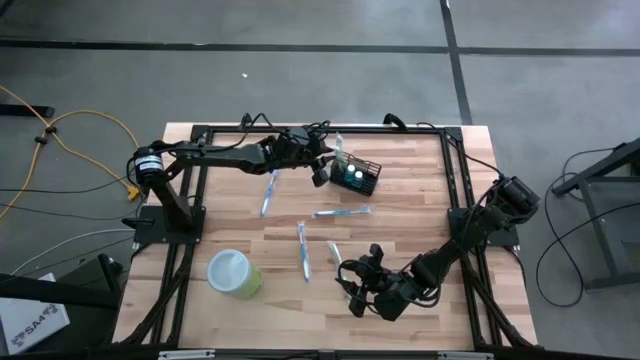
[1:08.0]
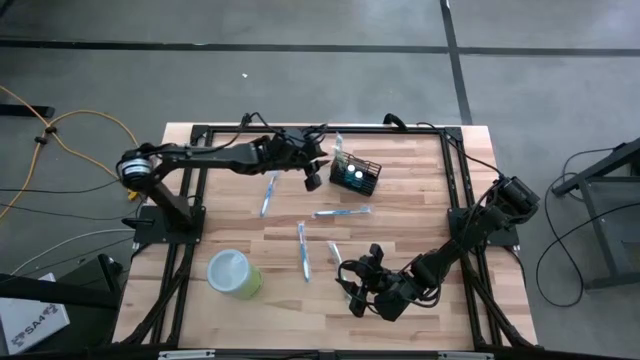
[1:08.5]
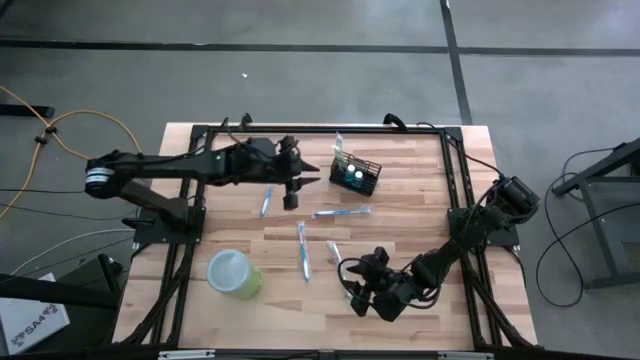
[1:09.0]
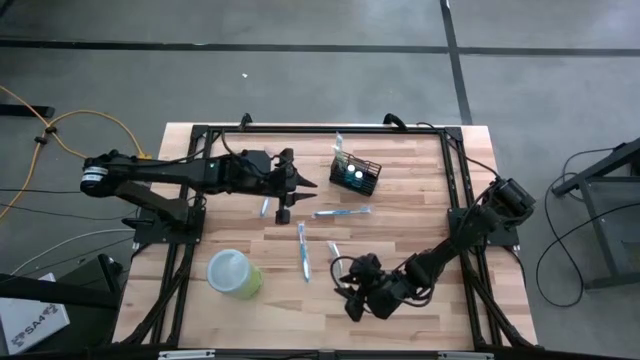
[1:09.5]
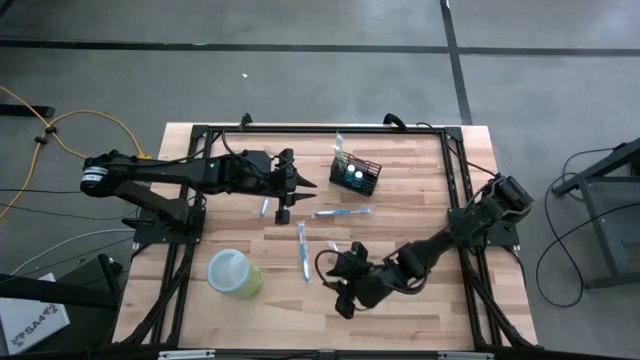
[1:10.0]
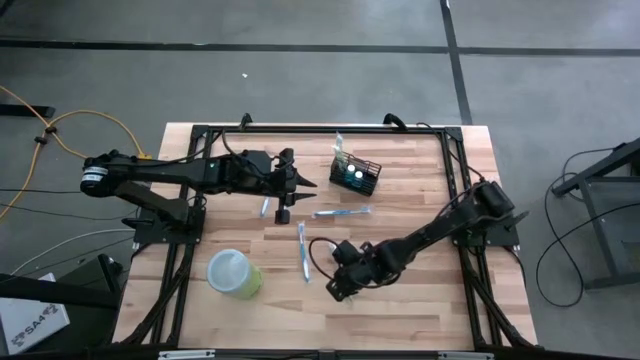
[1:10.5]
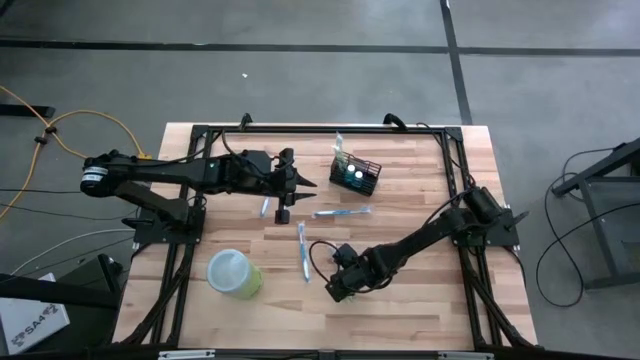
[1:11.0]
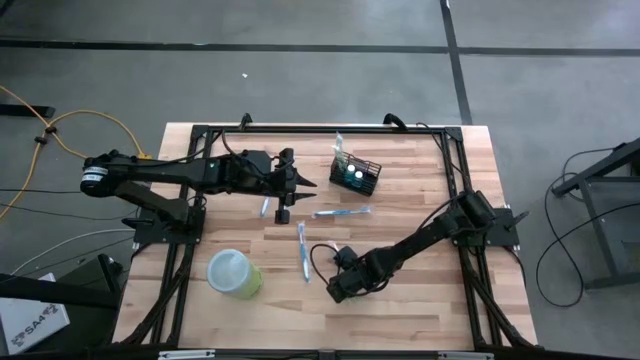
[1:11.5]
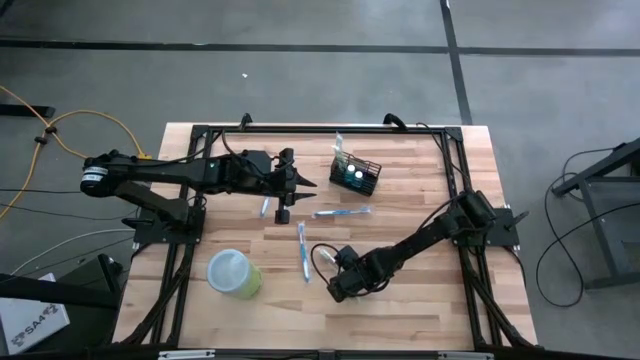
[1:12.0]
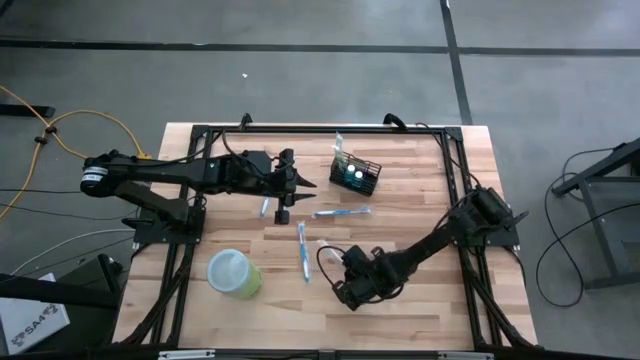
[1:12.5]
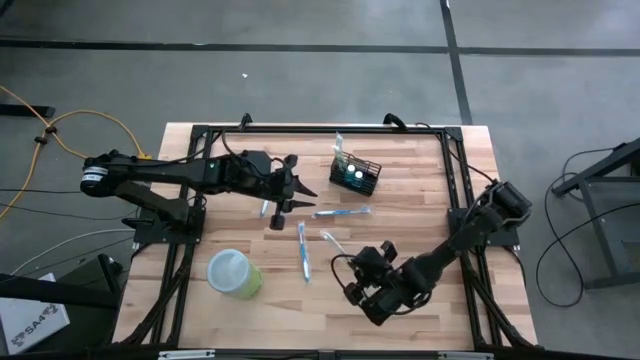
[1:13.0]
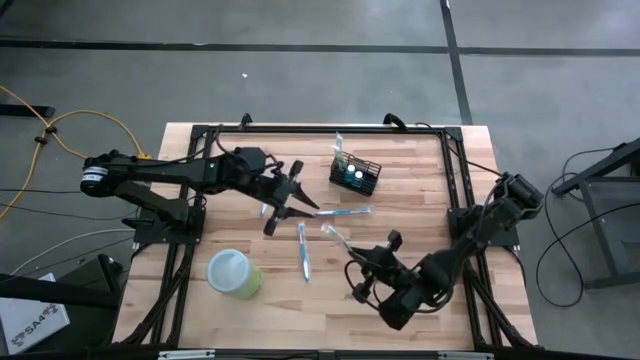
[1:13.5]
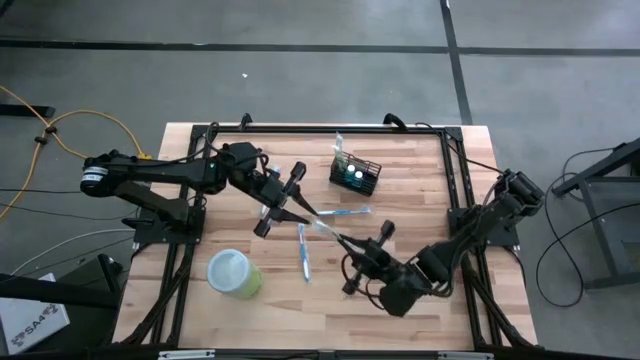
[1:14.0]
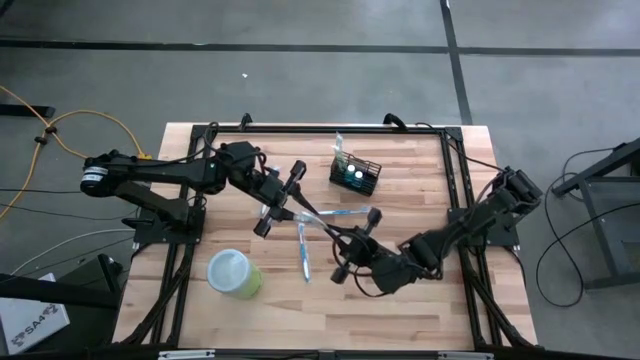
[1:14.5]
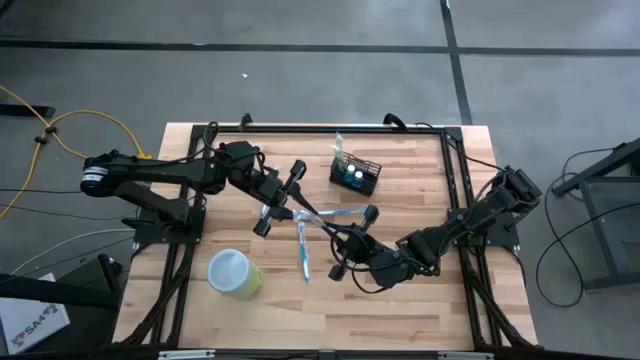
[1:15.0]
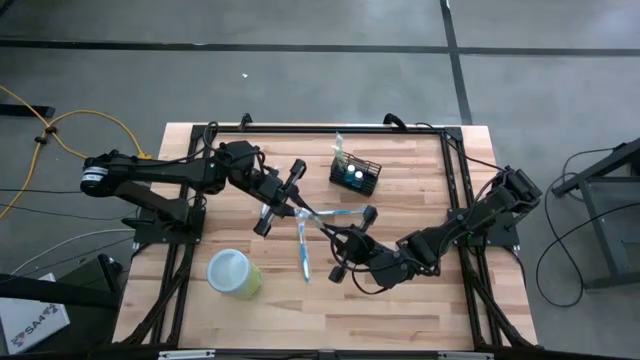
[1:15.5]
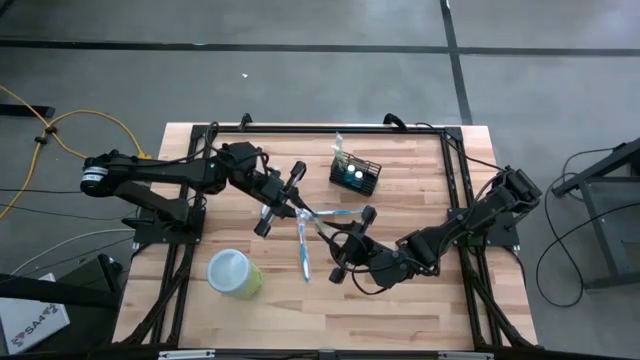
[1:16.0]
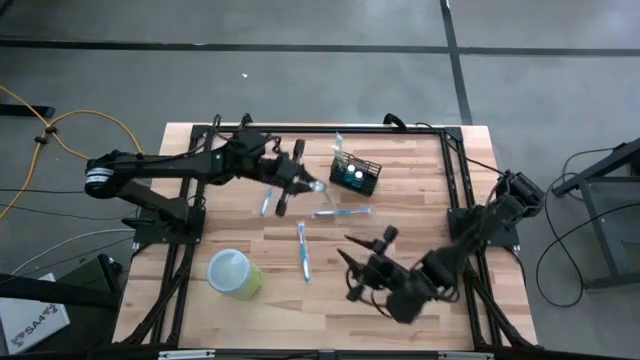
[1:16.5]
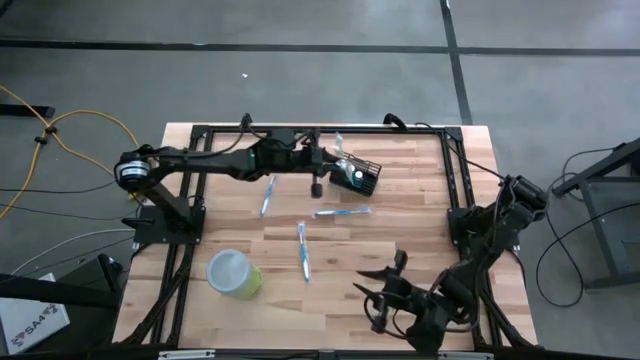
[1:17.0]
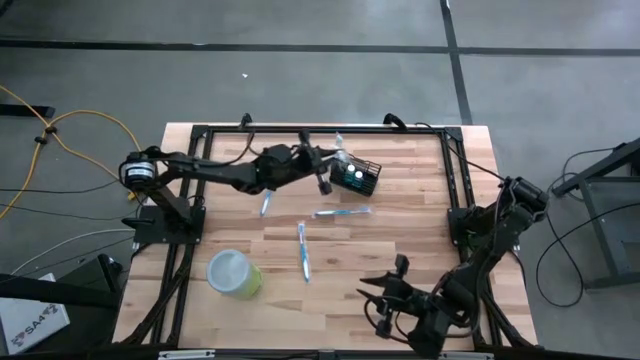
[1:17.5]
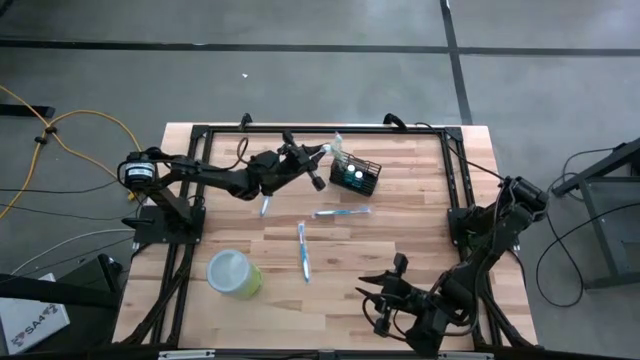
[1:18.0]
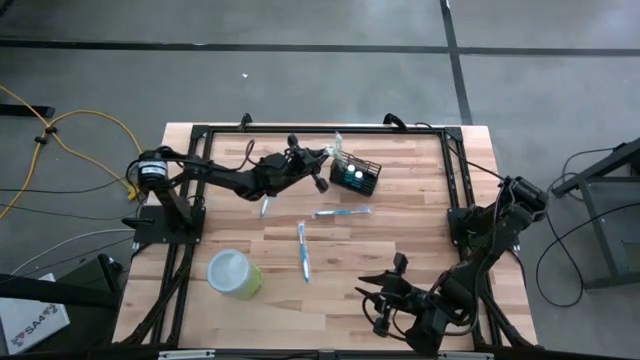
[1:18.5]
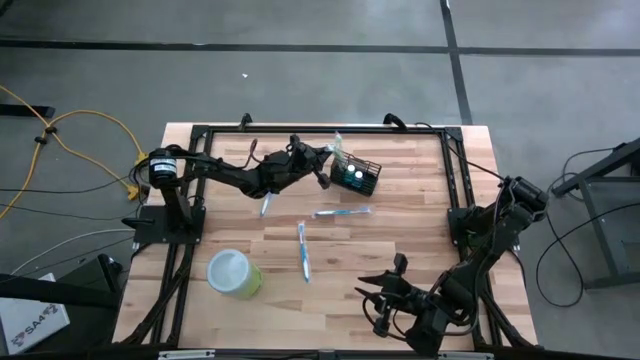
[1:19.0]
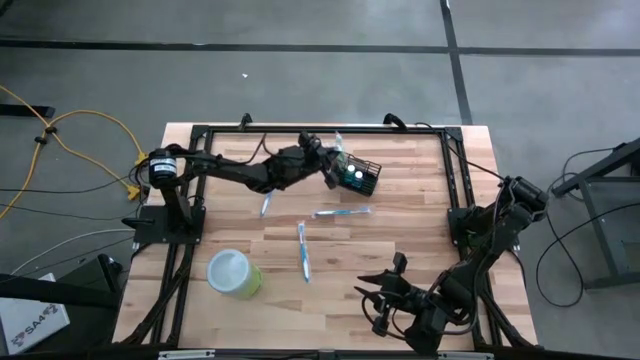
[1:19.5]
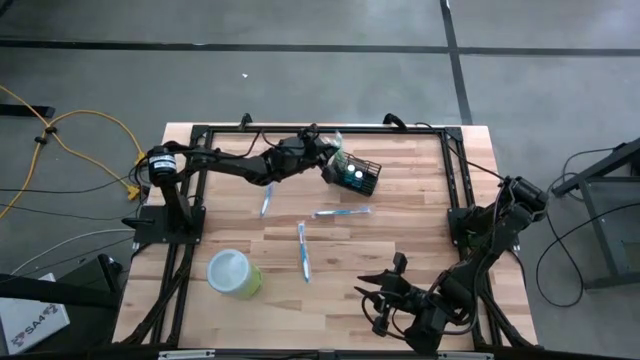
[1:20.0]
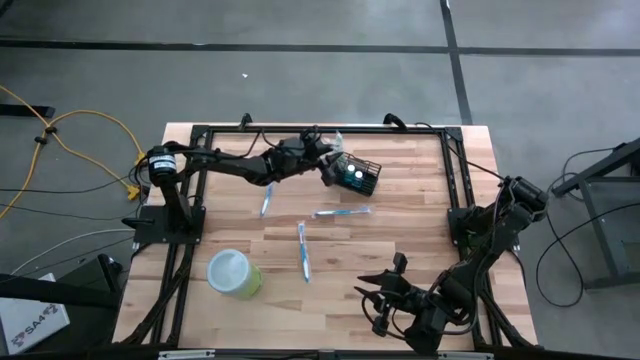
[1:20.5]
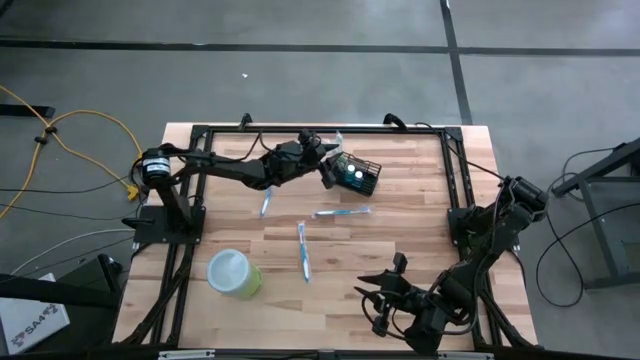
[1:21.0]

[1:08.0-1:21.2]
Task: Pick & Place toothbrushing station
Put the green toothbrush into the left section of the black mesh organizer

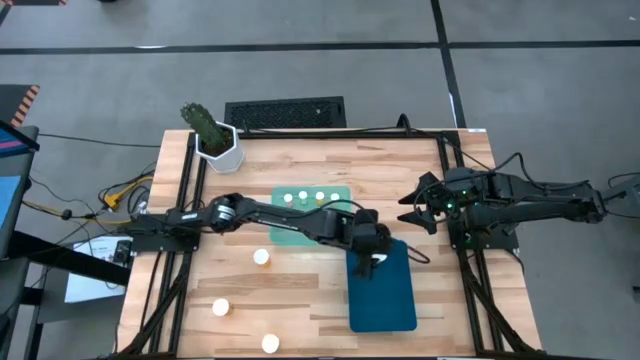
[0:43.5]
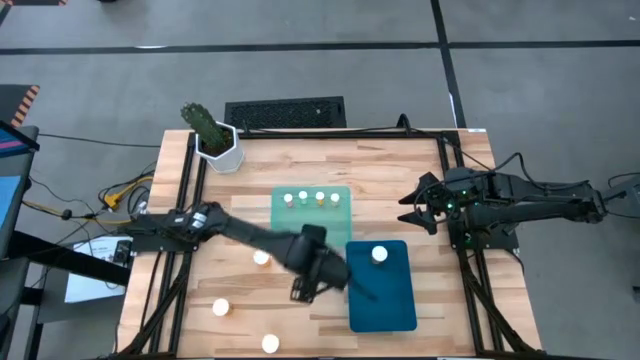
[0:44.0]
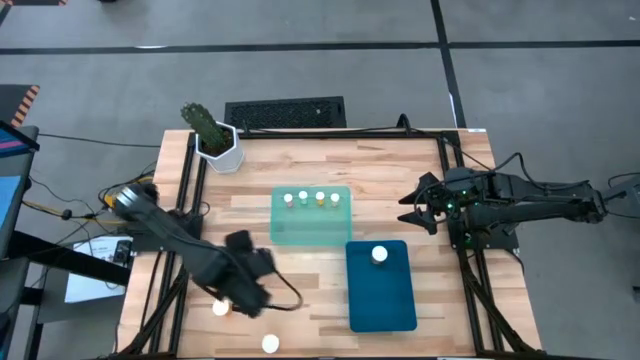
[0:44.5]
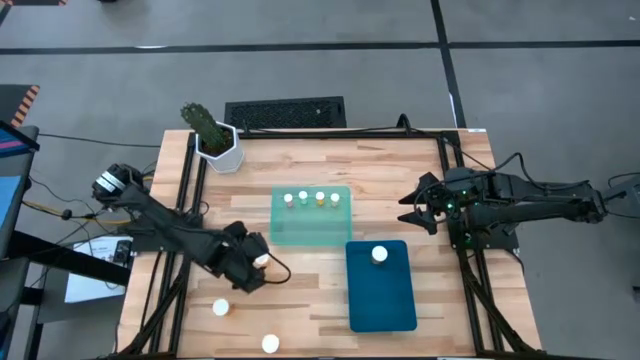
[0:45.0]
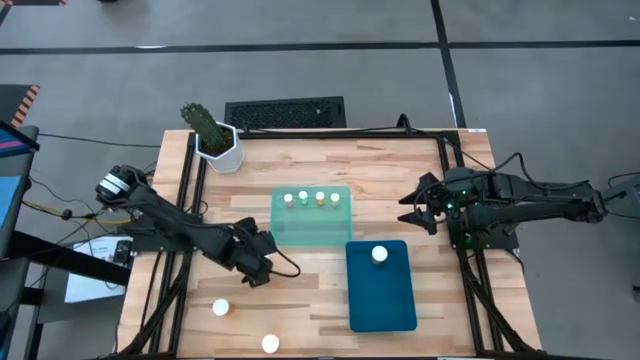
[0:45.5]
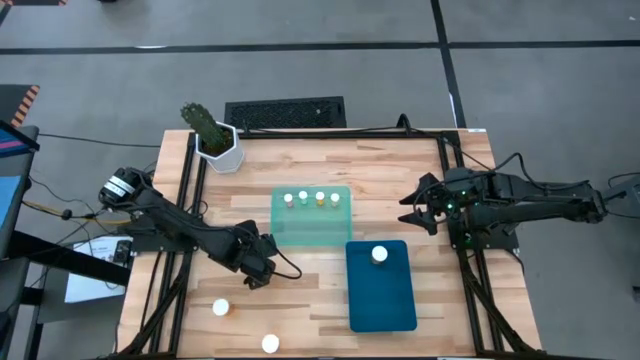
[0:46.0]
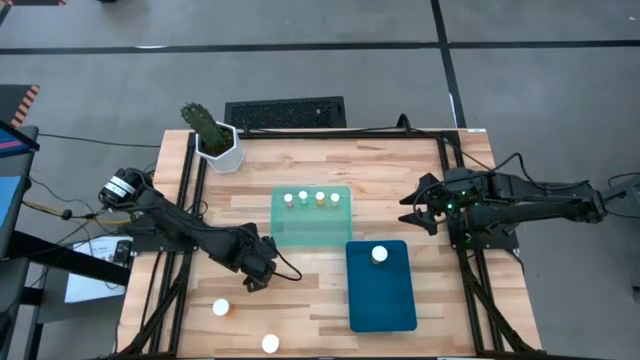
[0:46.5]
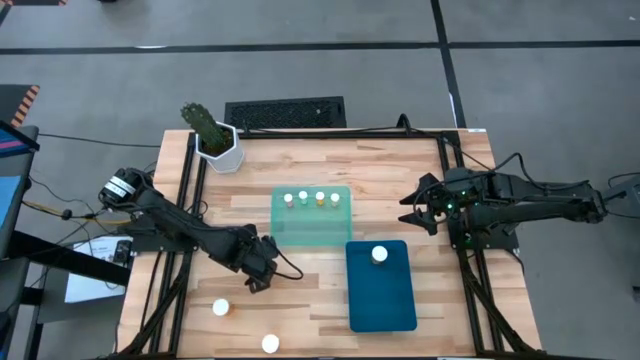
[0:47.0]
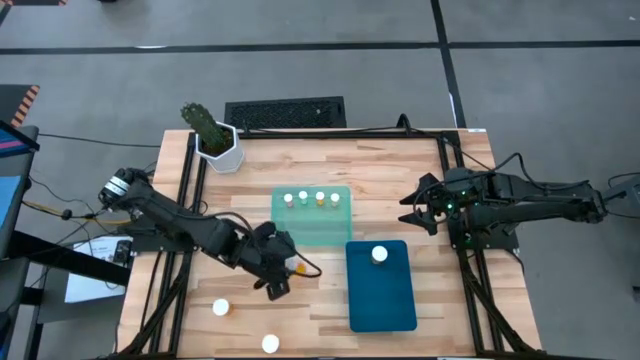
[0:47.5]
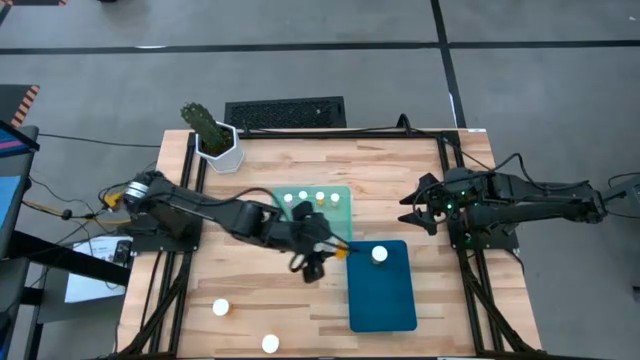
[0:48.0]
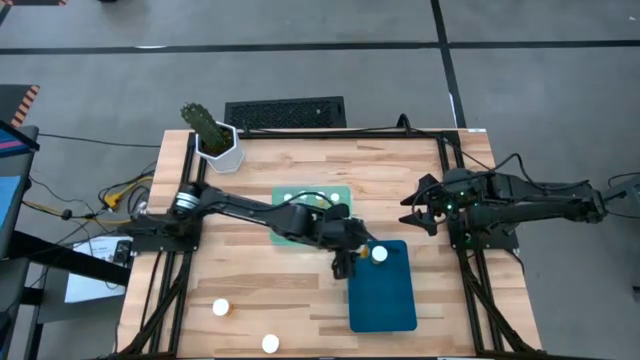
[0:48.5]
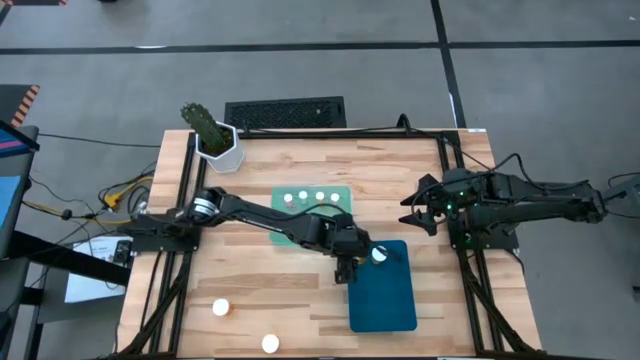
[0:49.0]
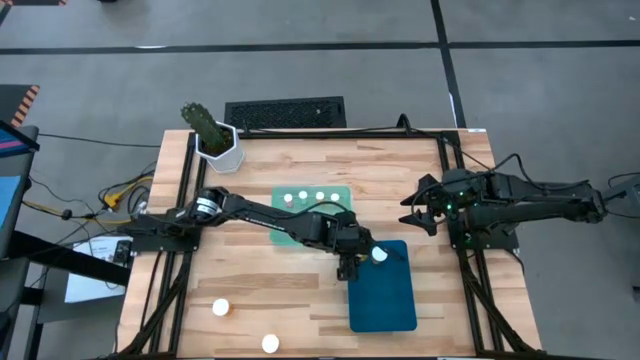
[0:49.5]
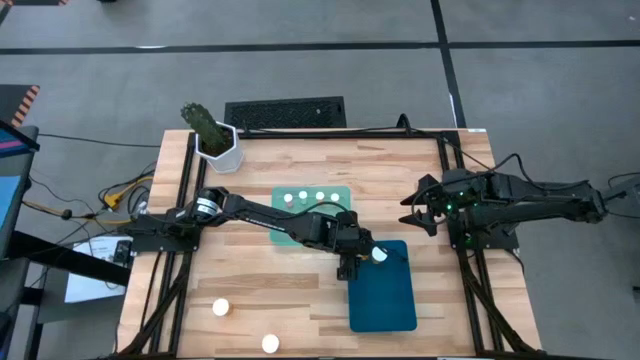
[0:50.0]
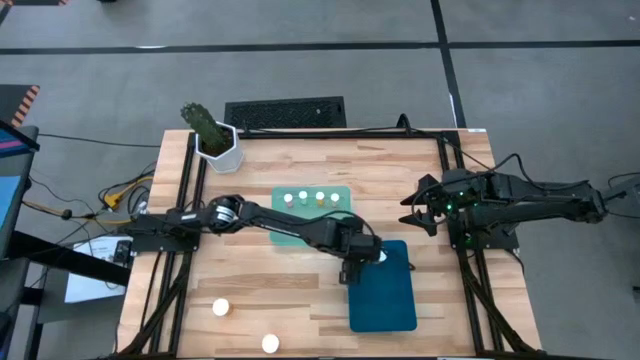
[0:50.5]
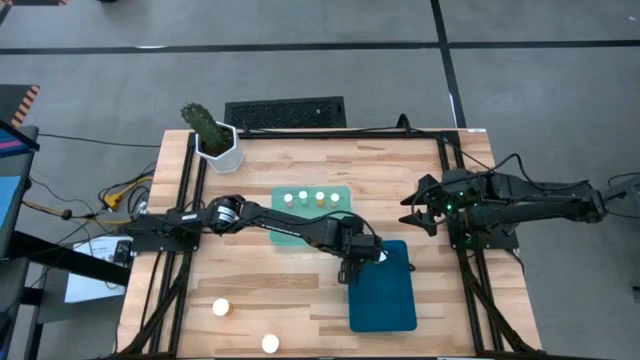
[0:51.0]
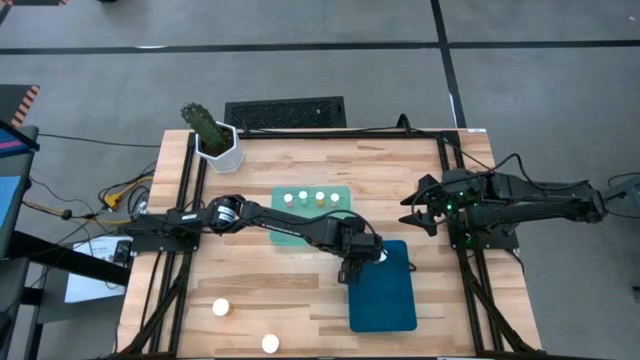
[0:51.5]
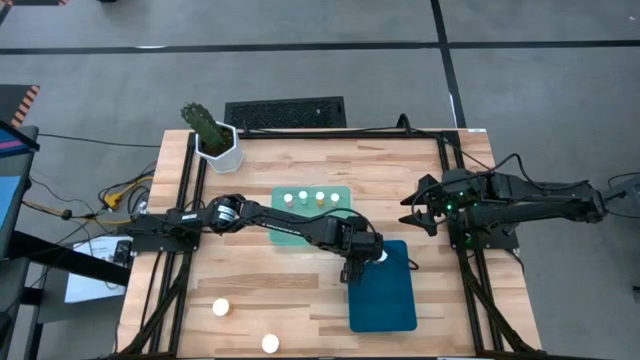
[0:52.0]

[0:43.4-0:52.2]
Task: Pick and place medicine bottles into bin by pill shape (circle, oval)
Put the large orange pill bottle into the blue bin
